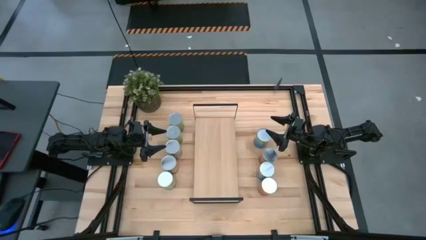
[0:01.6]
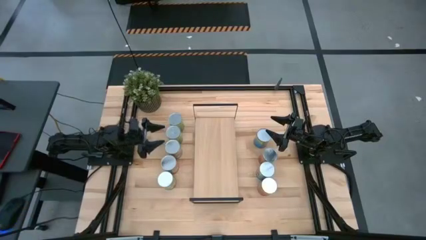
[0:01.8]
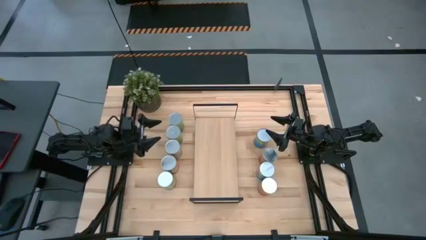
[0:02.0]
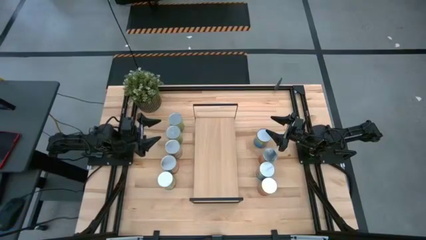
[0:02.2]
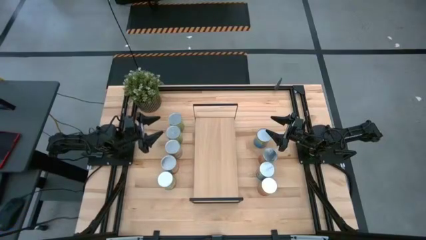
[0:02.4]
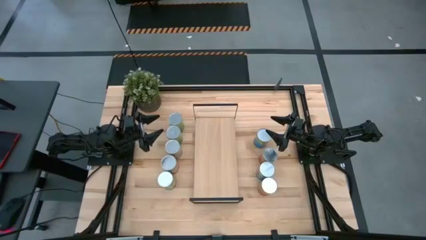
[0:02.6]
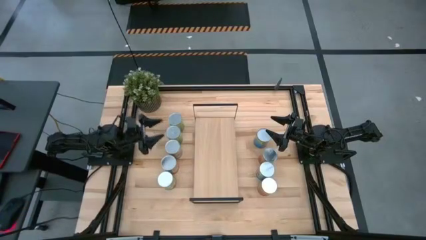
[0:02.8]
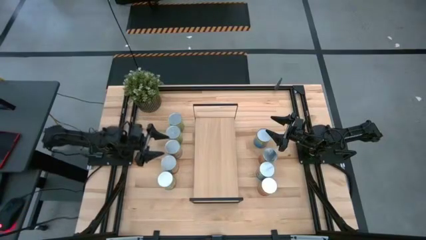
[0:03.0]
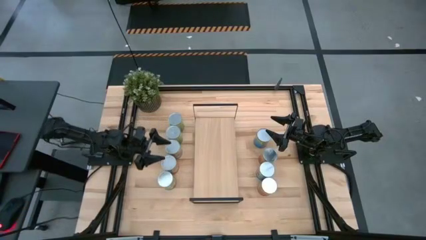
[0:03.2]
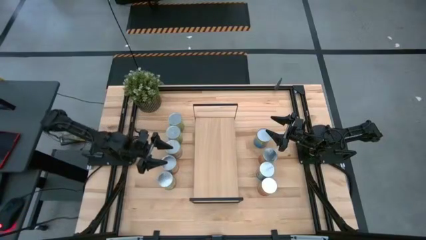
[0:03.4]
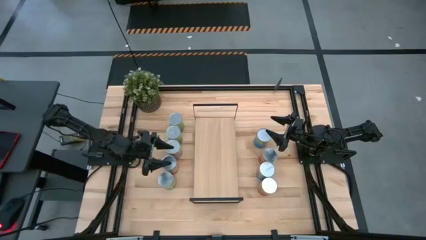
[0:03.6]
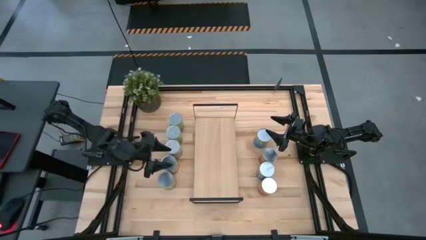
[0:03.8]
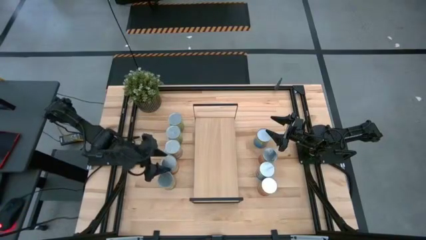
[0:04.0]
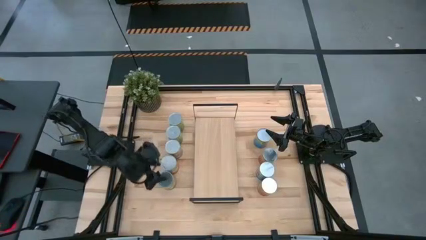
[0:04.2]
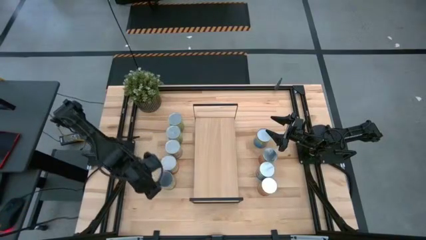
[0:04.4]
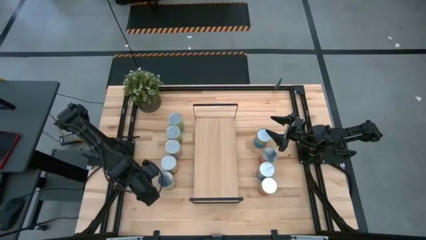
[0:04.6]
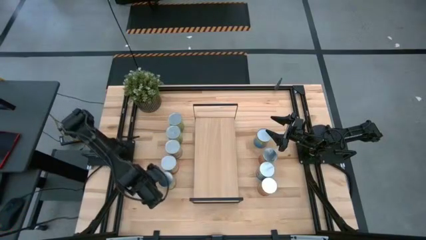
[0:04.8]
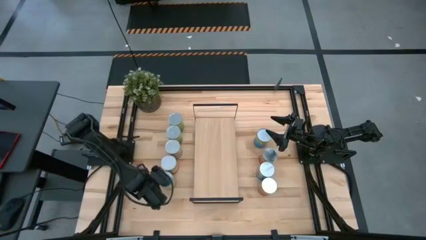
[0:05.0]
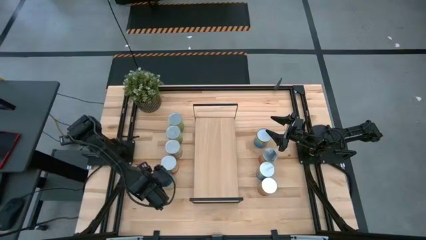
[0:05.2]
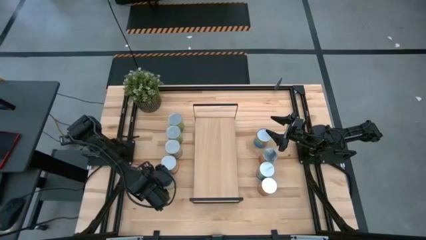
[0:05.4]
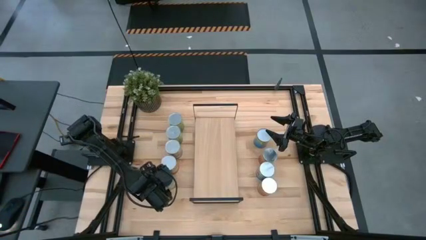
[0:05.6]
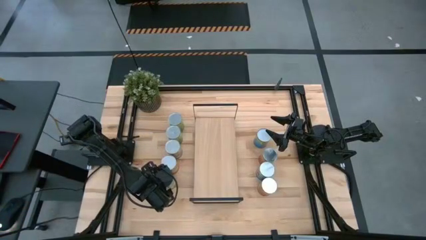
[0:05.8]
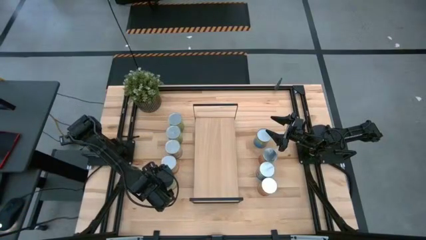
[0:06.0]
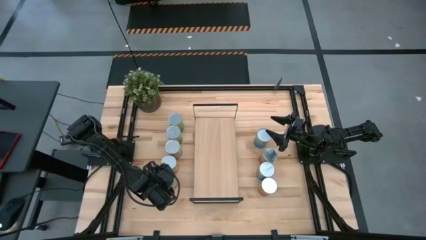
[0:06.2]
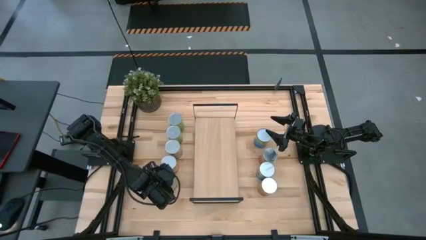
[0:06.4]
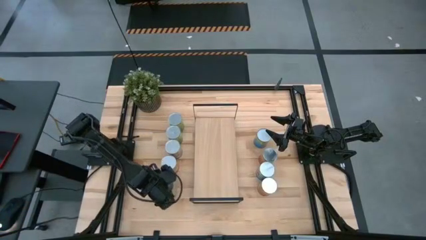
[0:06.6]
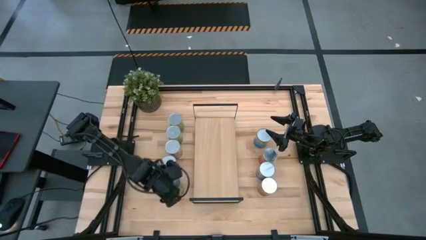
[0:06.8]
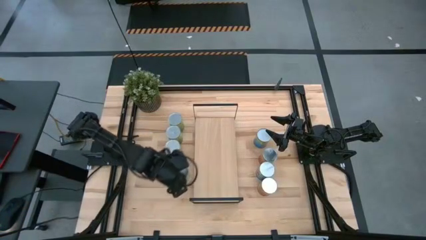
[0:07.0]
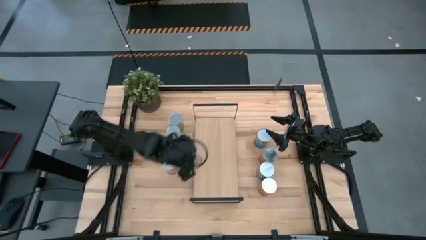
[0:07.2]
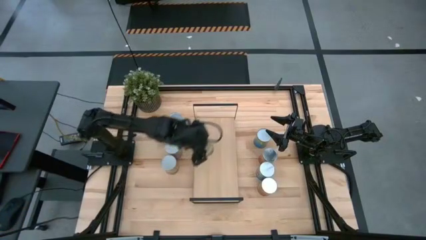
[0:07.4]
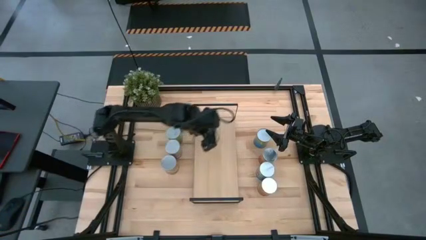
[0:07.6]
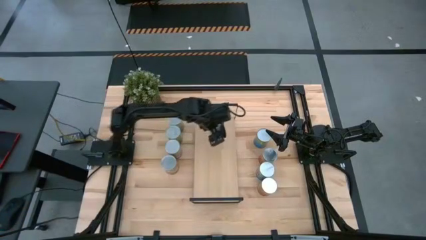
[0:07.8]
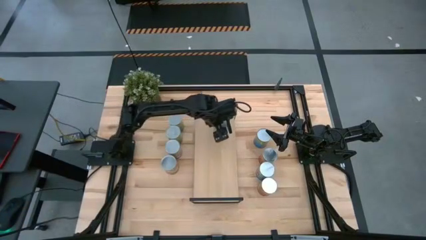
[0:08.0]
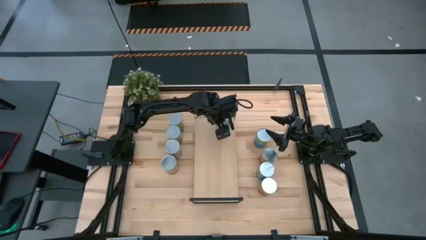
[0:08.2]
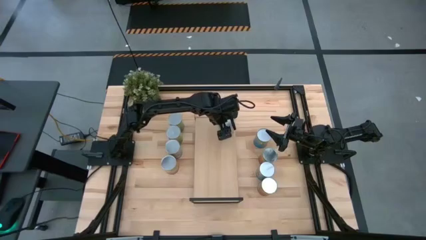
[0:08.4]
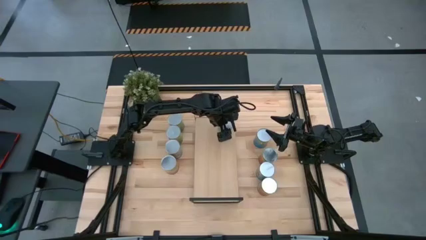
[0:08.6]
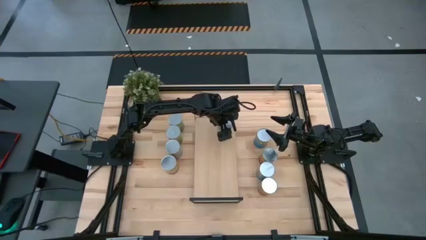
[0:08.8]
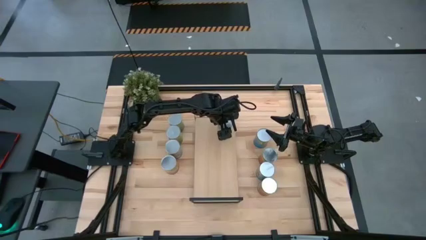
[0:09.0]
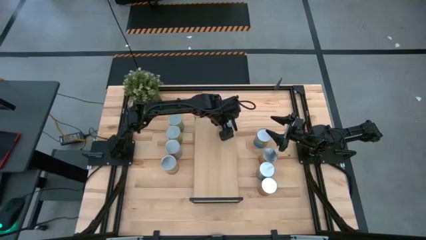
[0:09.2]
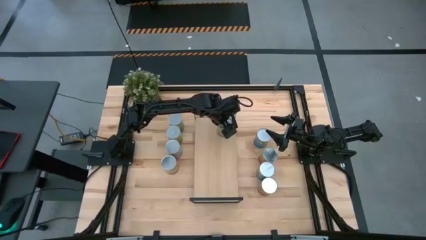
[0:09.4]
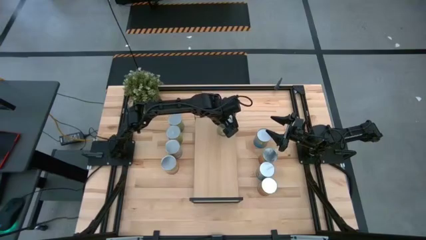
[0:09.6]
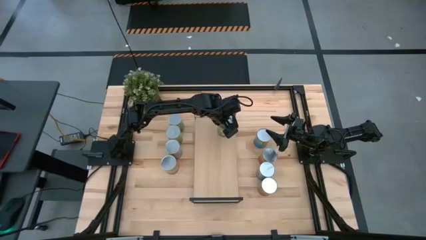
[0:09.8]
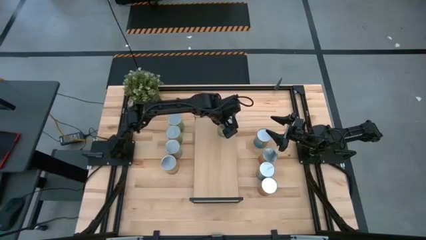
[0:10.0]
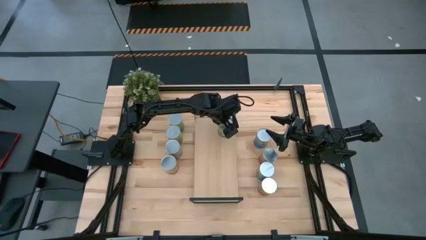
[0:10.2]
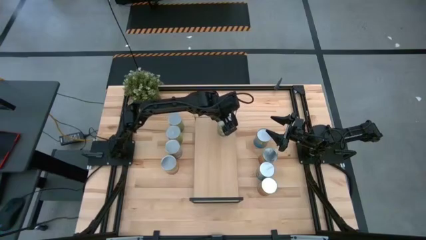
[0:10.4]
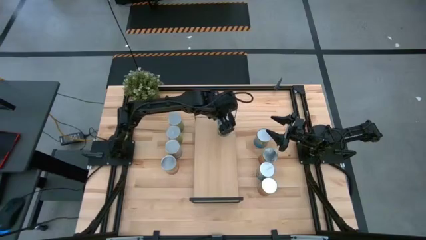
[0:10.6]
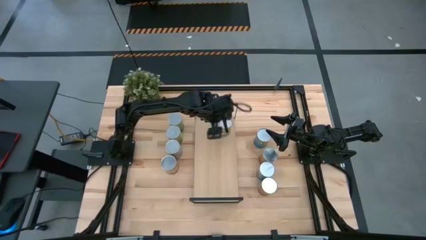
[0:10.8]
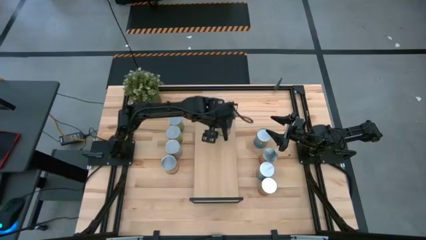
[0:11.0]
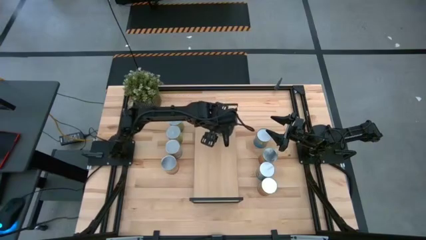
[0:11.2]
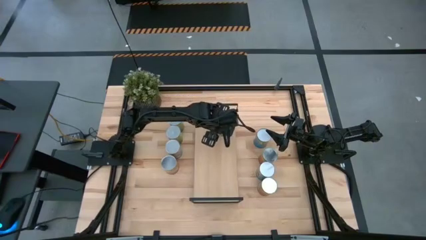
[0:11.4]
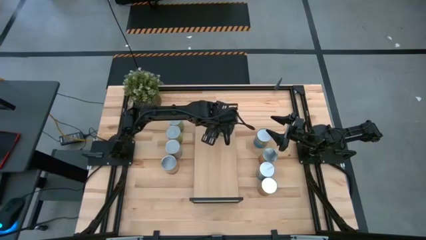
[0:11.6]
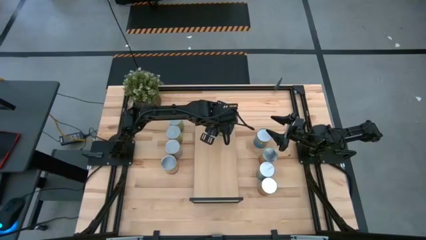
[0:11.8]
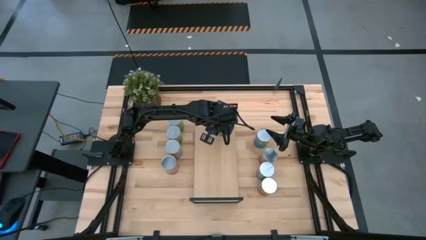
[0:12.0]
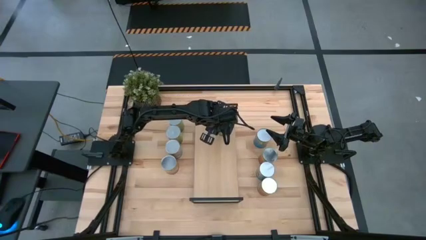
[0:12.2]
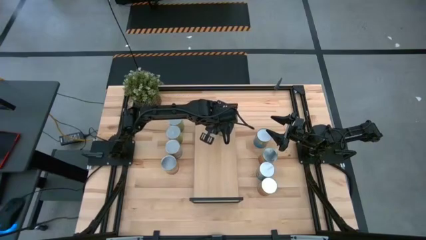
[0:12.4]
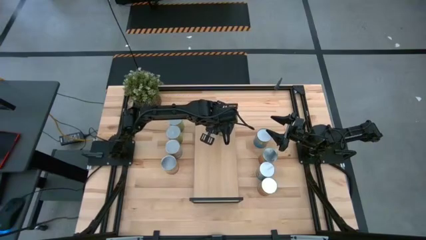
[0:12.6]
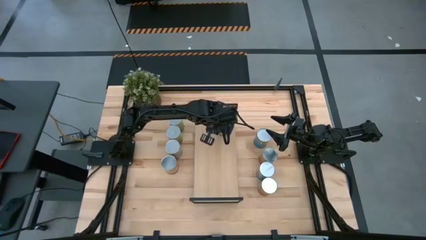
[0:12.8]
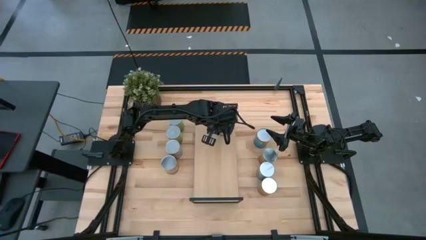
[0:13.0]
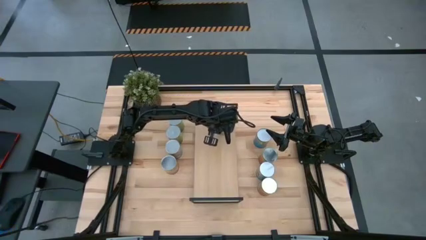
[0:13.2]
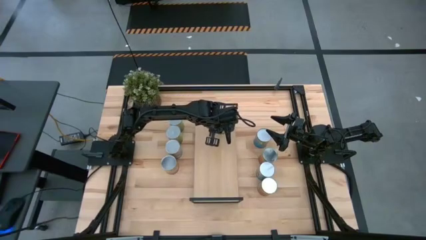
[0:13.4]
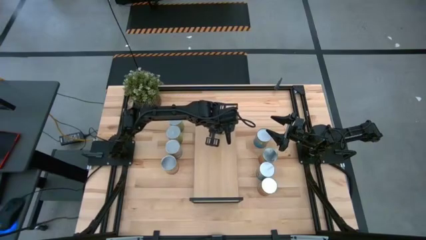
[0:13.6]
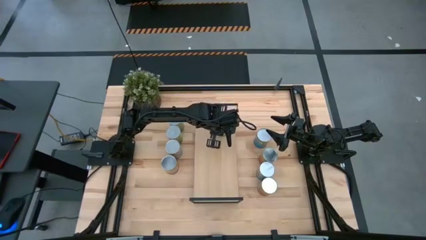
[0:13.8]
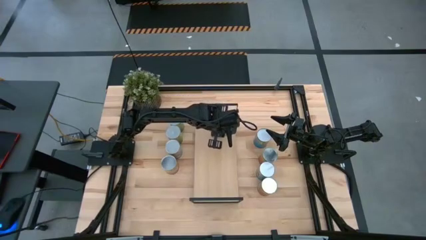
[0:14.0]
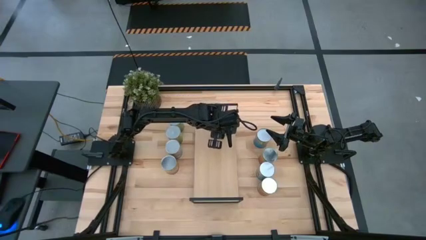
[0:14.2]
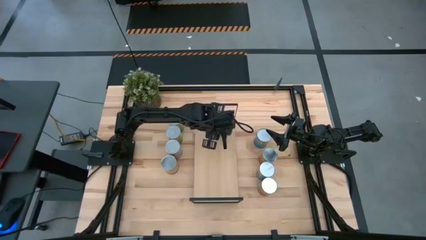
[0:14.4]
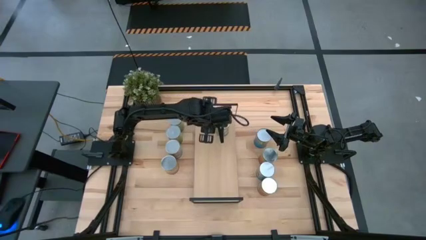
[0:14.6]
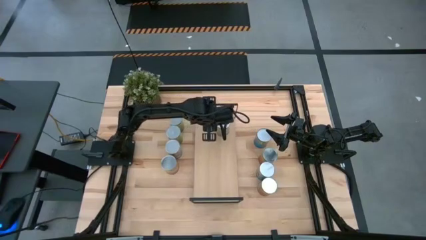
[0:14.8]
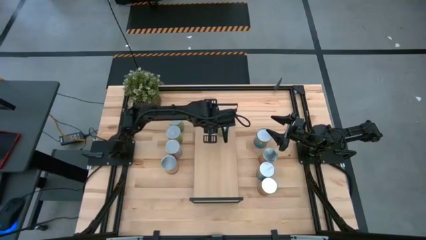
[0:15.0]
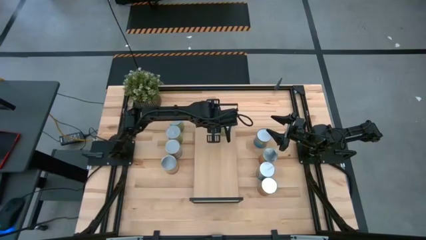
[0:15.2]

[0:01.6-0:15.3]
Task: Pick and place cans onto a shelf
Put the canned pears on the shelf

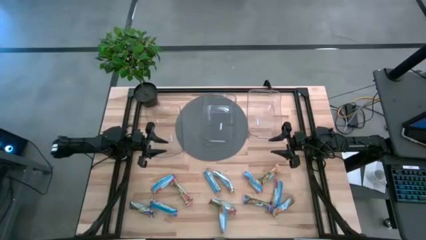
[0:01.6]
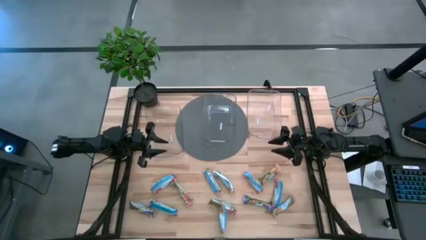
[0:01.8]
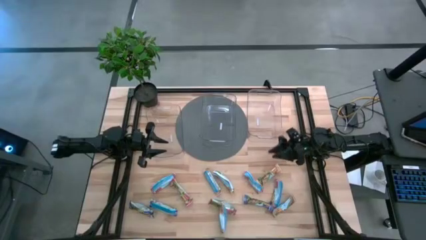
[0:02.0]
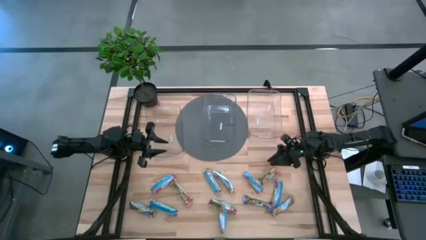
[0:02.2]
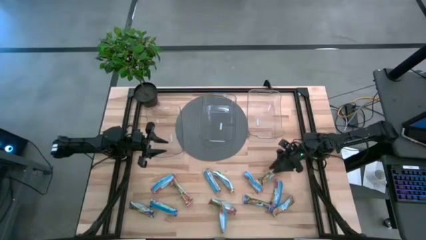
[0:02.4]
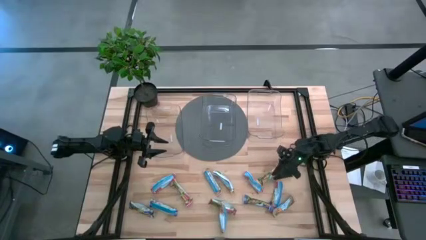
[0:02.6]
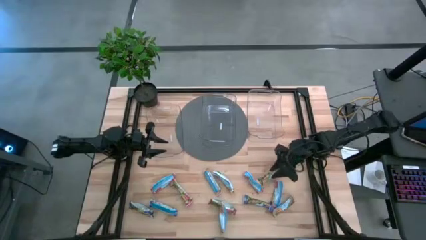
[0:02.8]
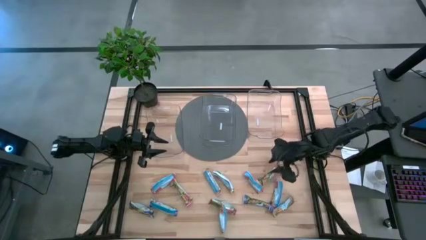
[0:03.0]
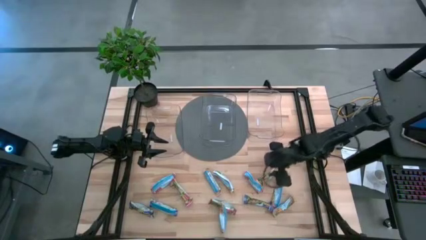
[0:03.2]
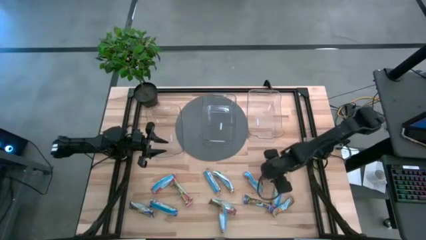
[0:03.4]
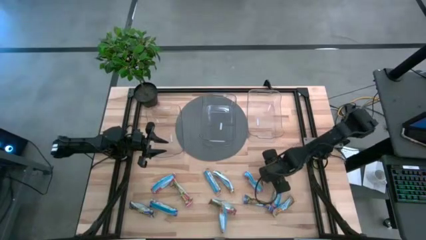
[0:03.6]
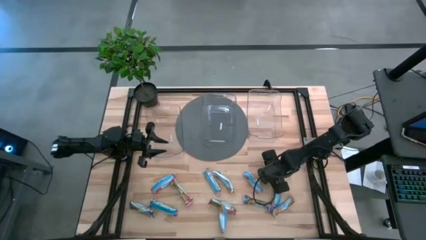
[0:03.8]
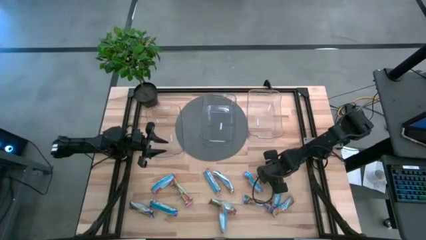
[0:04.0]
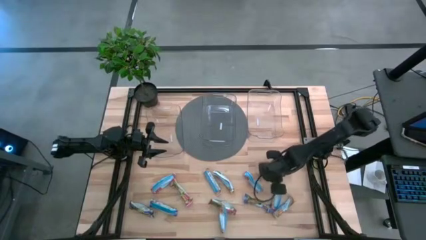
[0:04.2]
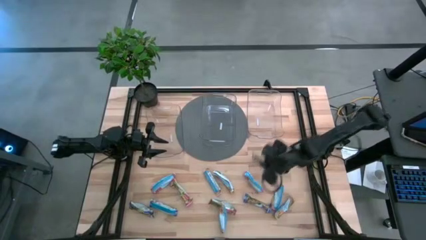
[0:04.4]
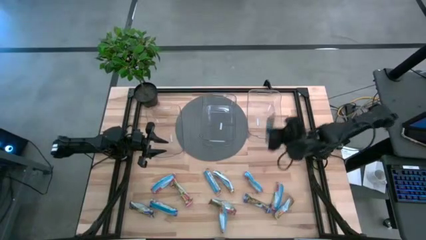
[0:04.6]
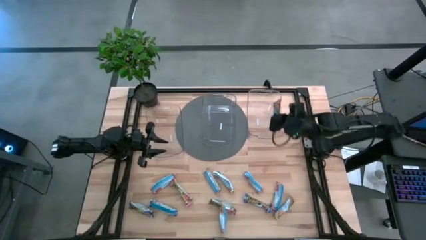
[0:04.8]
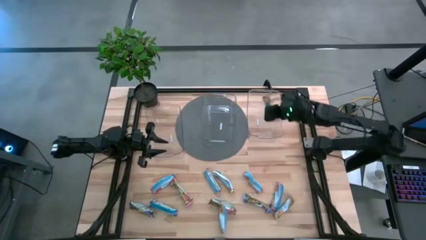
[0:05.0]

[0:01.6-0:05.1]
Task: Pick and place Granola Bars by type
Put the orange granola bar into the right transparent bin
